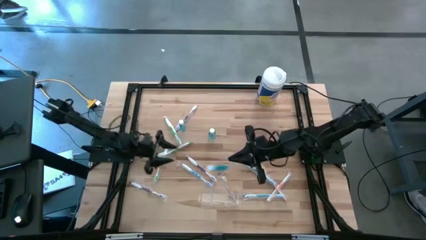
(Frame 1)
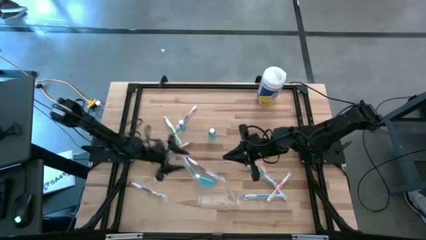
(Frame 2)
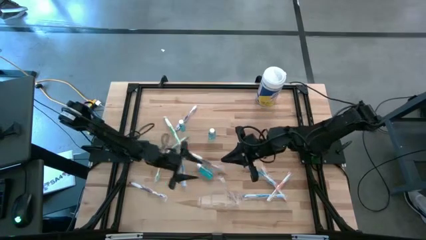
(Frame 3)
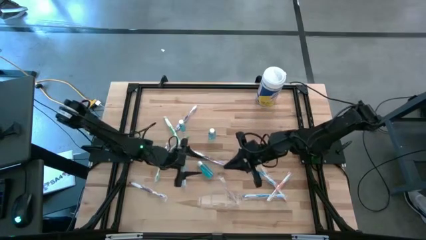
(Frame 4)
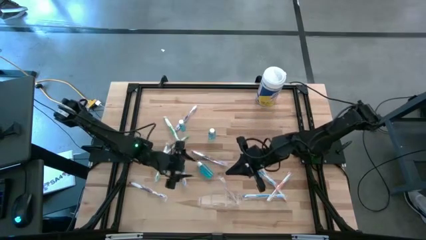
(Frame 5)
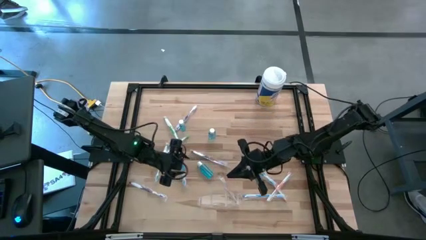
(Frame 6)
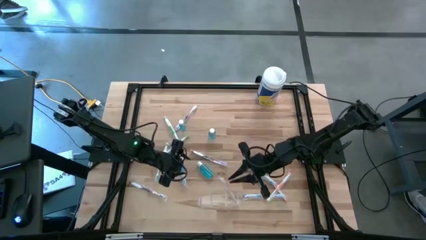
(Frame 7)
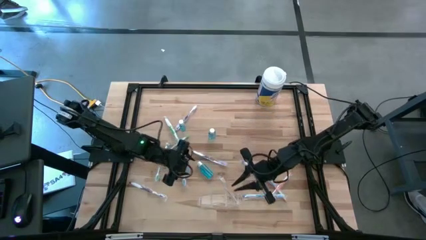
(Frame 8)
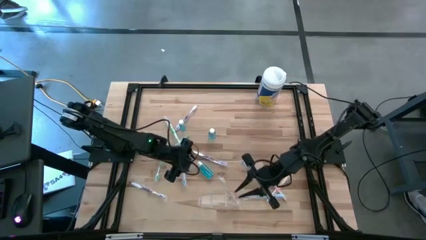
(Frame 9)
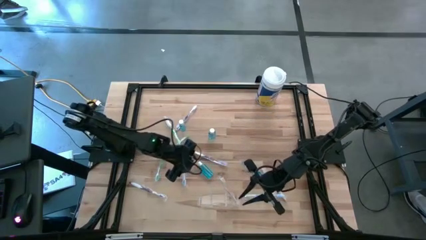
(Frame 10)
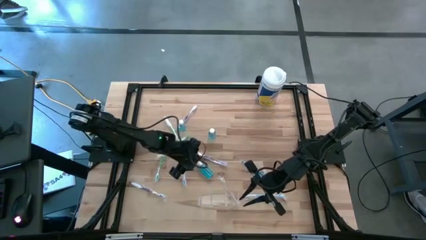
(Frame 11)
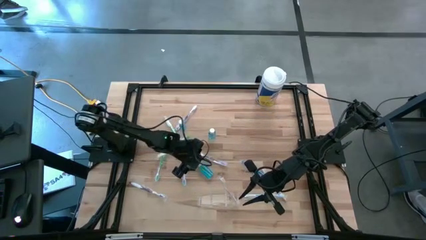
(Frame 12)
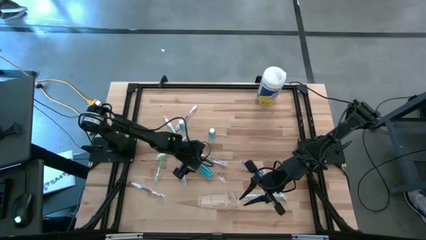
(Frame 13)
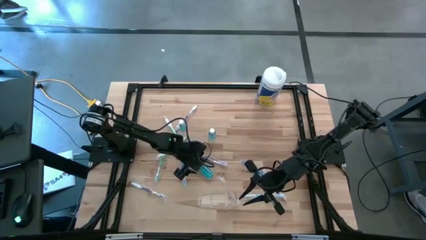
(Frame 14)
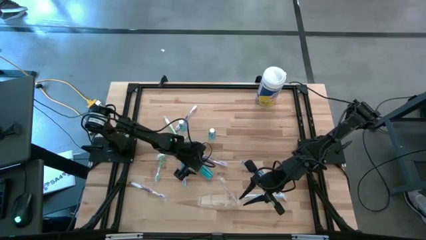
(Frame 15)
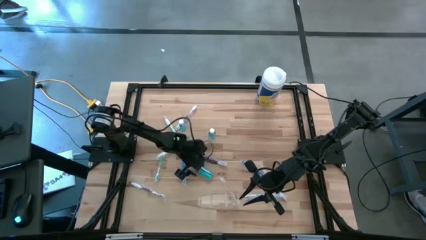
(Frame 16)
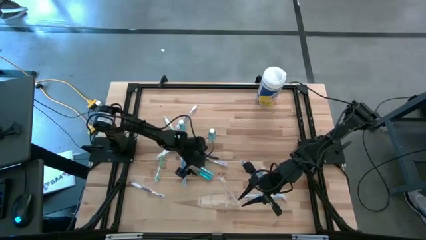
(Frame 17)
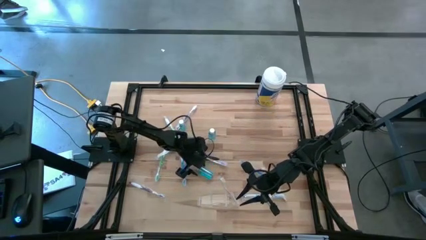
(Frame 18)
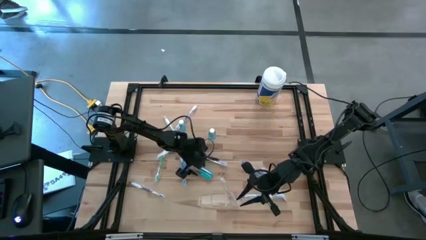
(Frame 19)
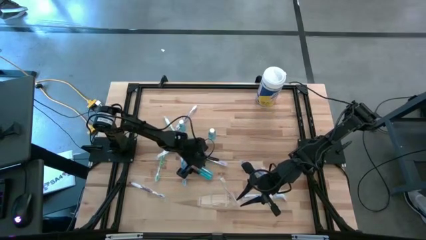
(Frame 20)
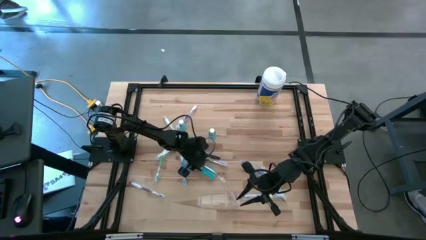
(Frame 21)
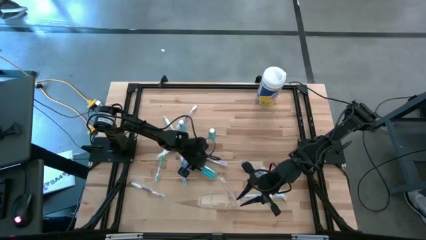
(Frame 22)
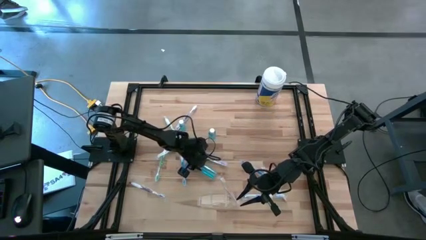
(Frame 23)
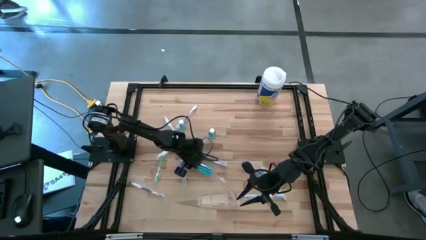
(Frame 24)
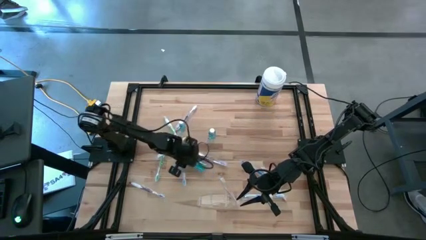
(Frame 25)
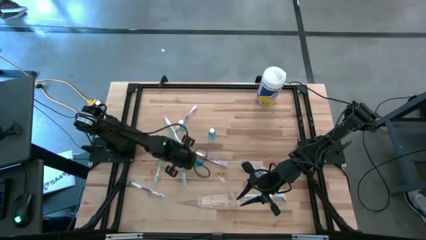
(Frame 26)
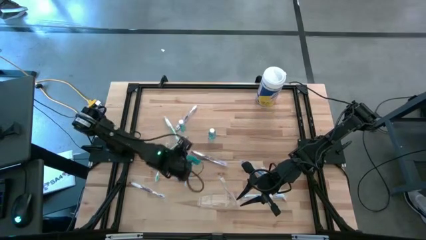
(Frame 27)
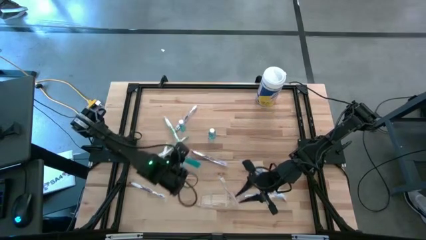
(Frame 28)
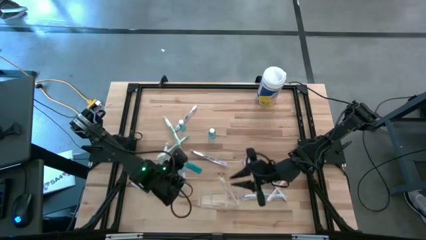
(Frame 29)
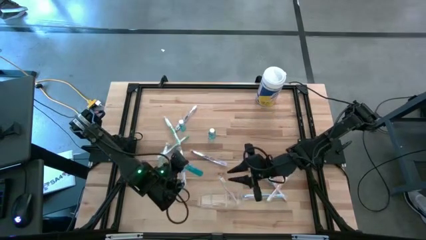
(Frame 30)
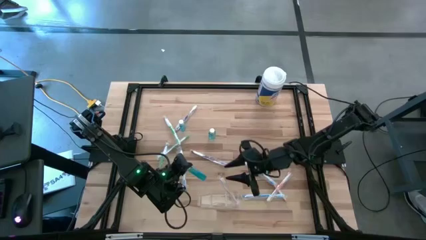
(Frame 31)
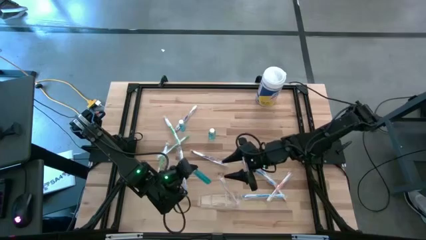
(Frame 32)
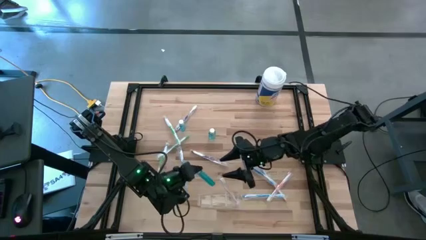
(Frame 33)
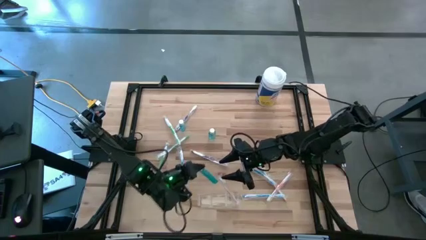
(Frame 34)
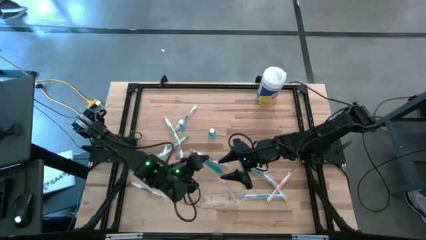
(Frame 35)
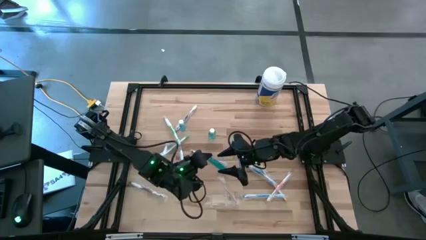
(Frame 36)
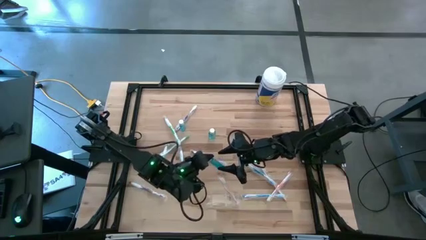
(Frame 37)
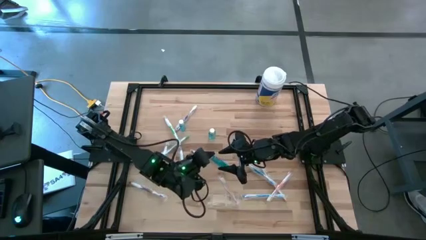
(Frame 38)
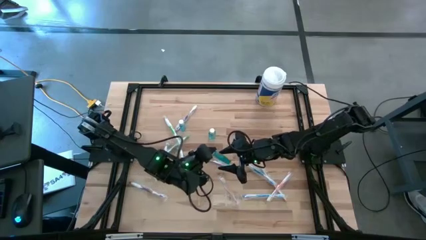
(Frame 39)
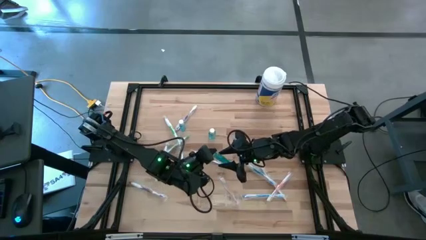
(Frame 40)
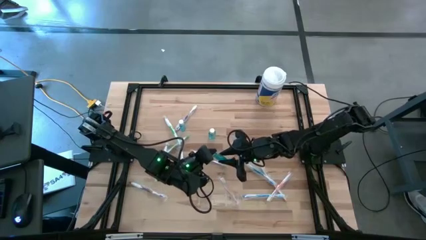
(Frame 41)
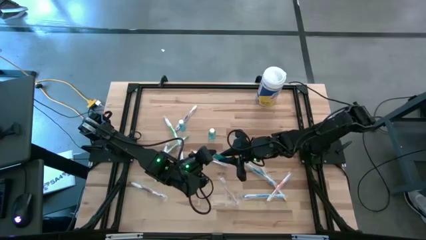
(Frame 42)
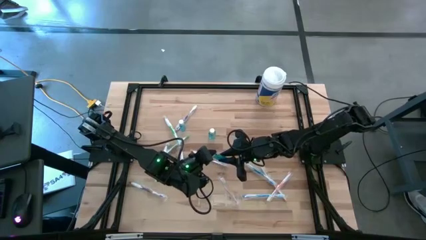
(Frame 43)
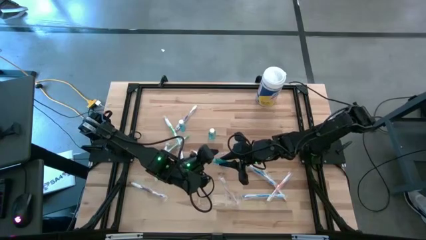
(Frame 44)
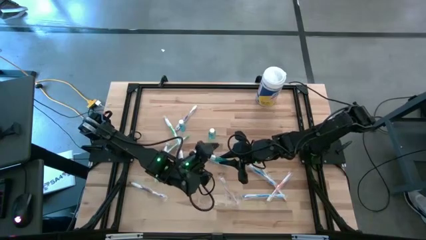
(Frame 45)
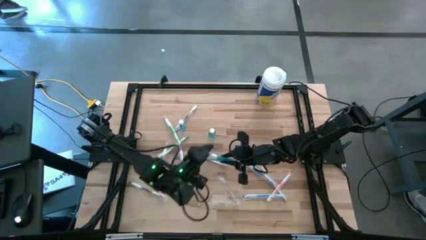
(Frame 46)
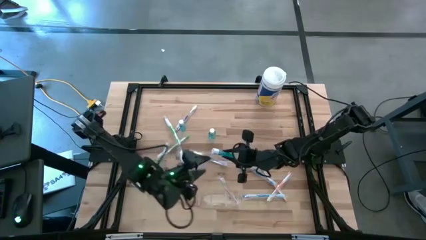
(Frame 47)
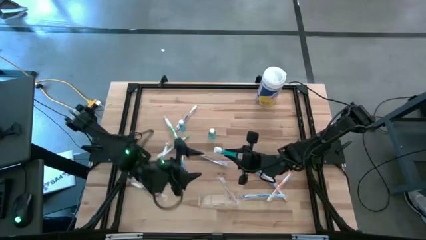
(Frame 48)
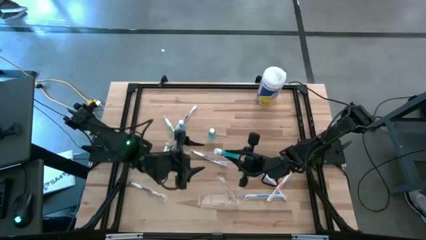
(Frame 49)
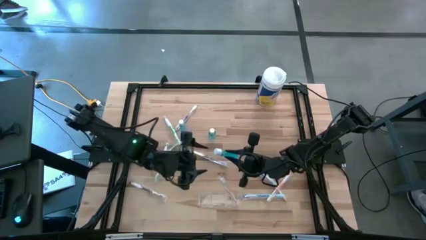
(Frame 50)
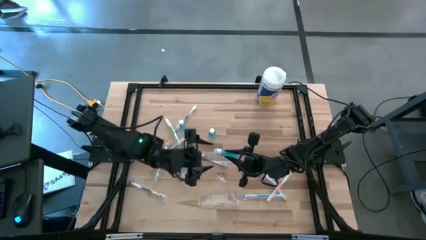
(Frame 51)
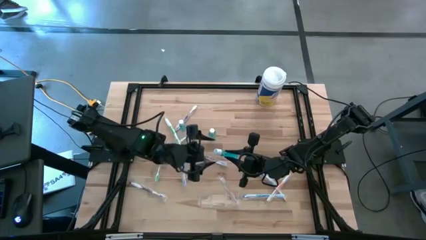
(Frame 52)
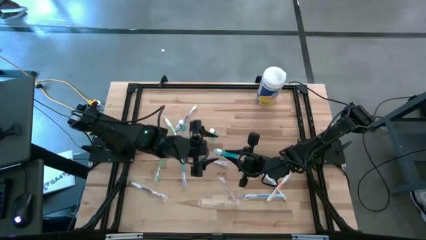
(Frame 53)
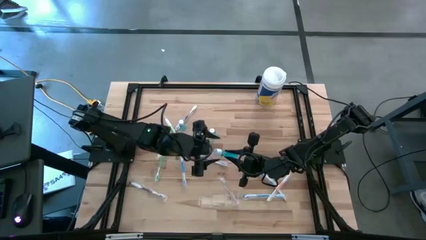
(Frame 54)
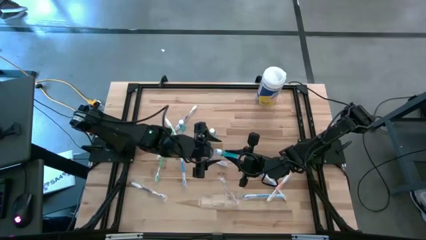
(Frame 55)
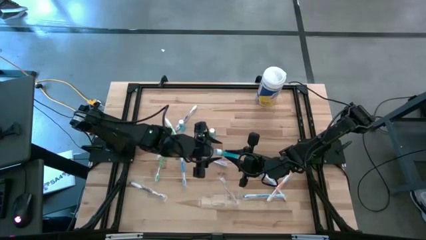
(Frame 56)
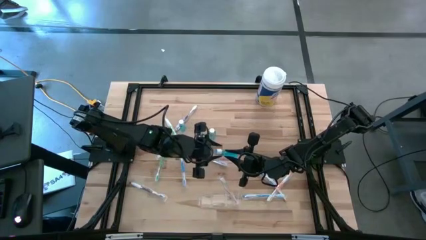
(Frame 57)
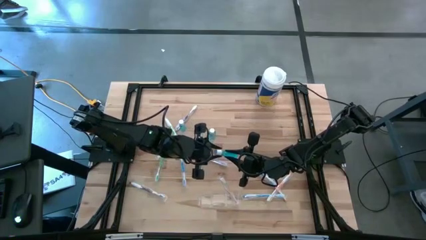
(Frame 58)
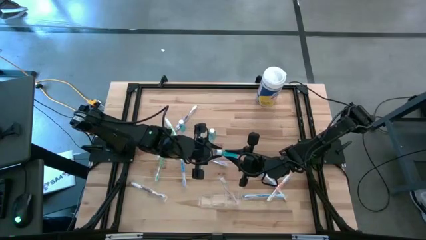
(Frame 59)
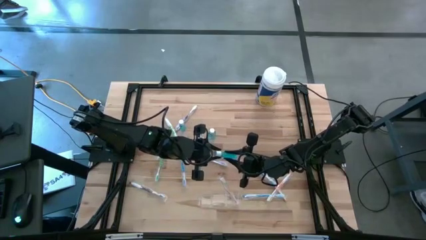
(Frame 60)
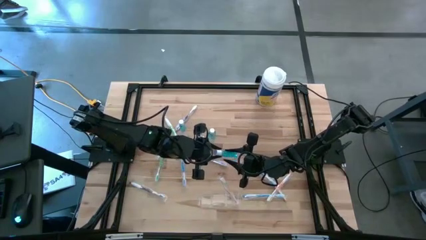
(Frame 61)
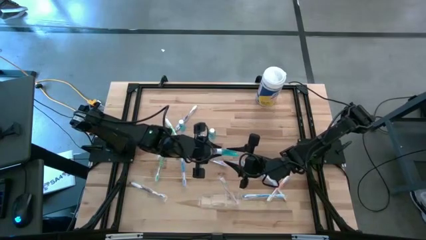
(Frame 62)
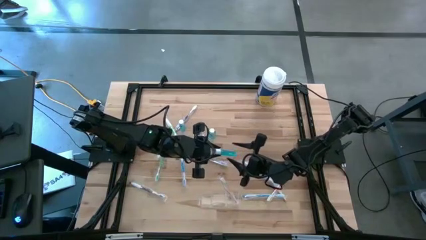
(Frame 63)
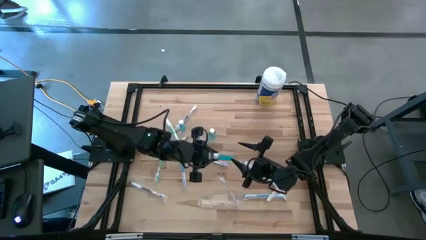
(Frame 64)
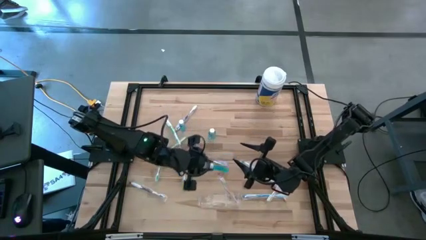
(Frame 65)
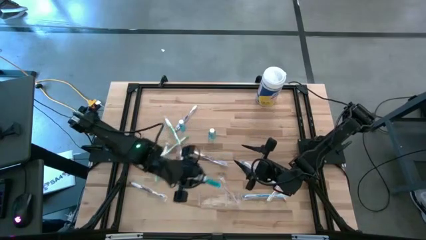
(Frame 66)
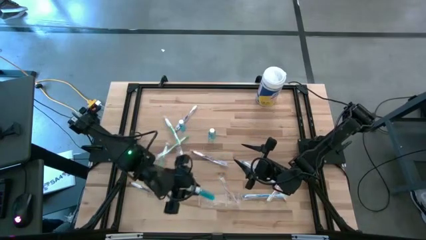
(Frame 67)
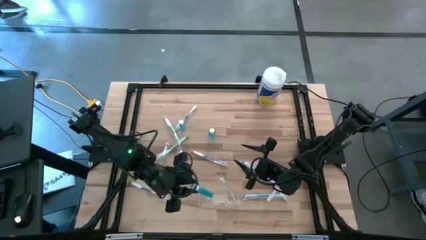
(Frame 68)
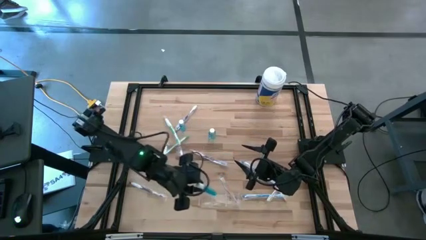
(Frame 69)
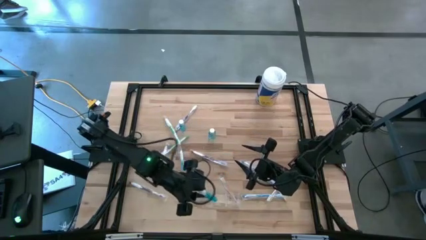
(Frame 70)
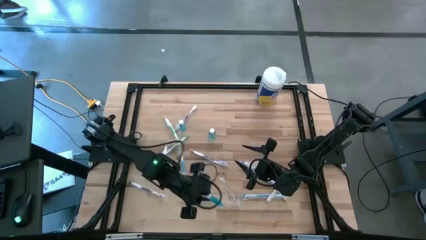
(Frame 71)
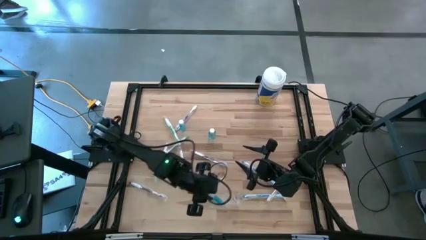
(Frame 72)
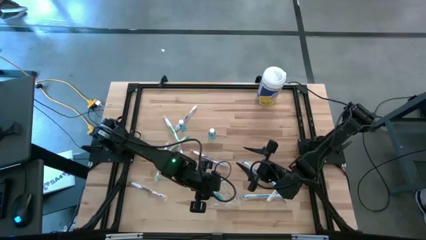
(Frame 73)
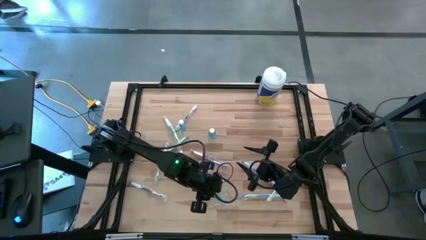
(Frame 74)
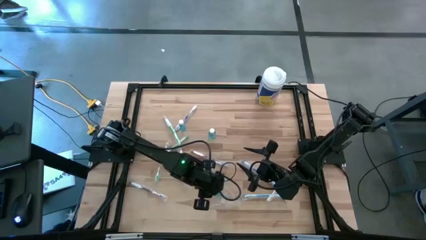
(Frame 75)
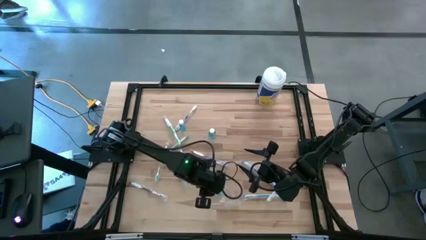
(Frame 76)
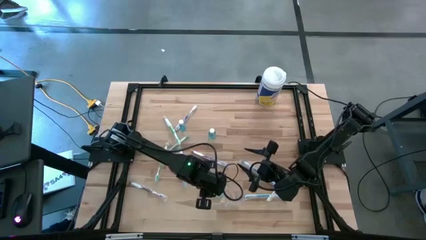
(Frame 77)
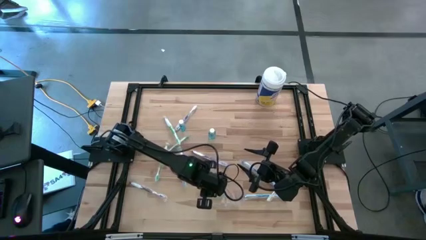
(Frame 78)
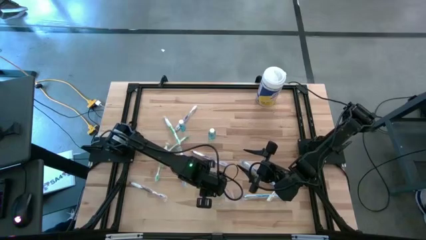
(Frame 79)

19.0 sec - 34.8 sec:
Task: Pick & Place toothbrushing station
Put the mouthwash into the transparent organizer
